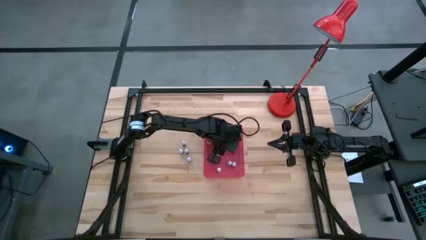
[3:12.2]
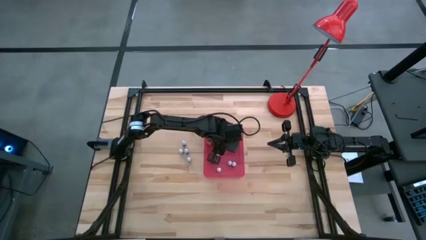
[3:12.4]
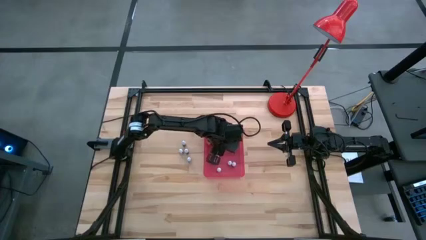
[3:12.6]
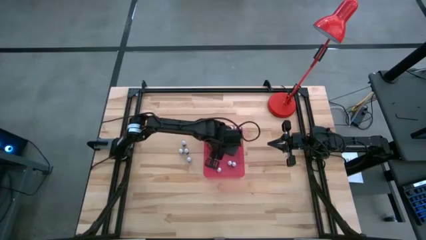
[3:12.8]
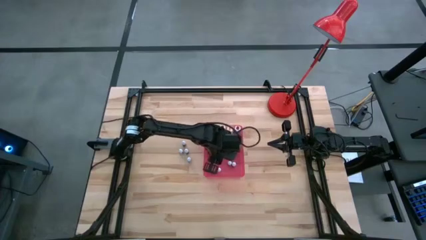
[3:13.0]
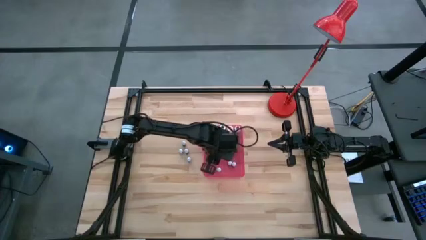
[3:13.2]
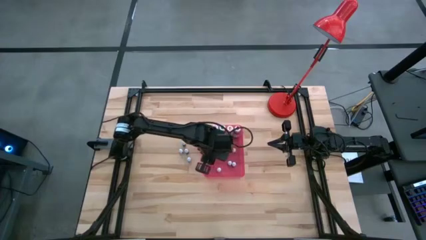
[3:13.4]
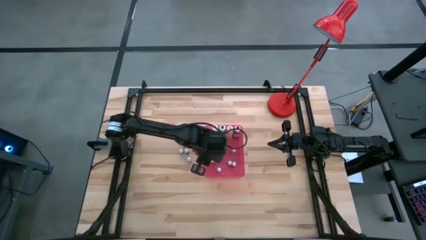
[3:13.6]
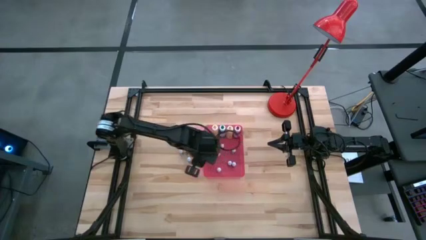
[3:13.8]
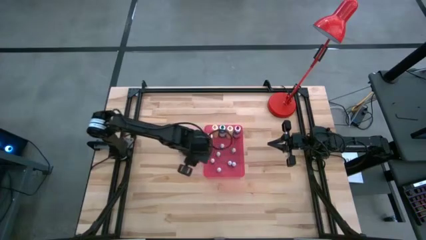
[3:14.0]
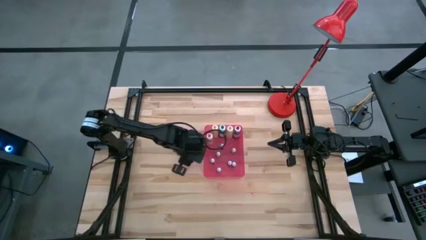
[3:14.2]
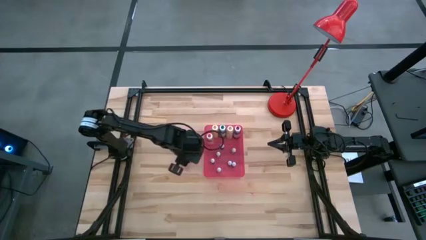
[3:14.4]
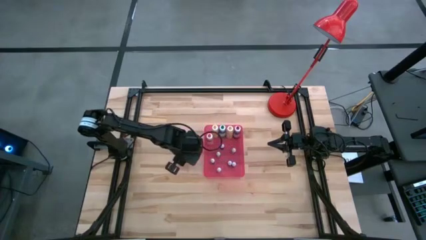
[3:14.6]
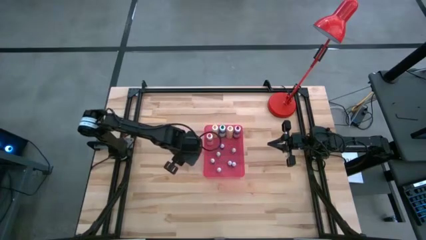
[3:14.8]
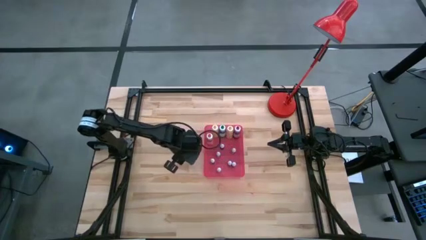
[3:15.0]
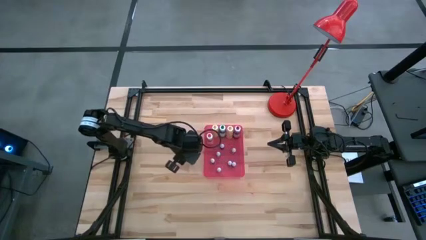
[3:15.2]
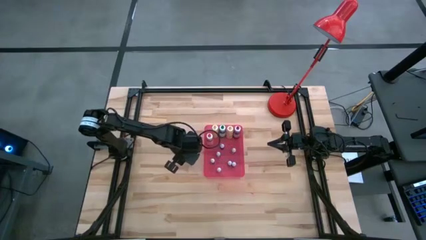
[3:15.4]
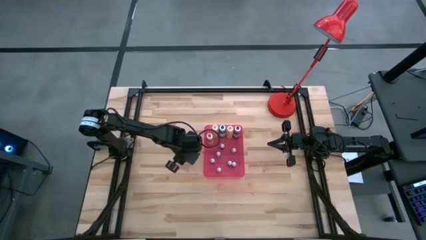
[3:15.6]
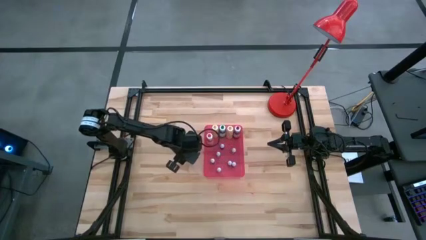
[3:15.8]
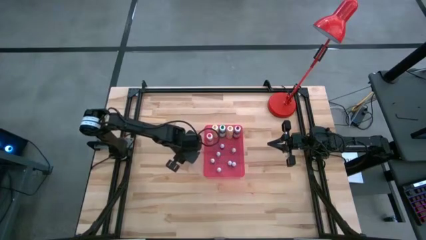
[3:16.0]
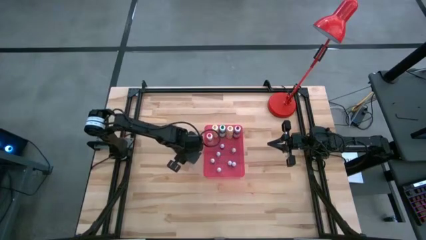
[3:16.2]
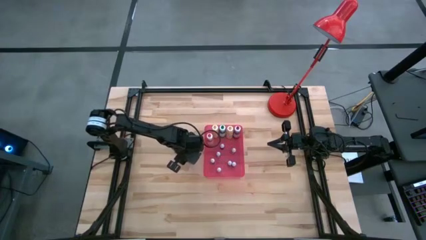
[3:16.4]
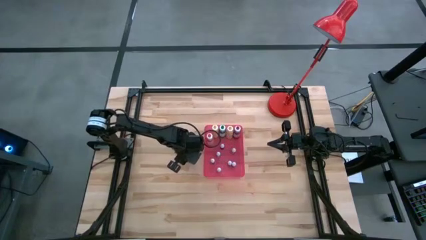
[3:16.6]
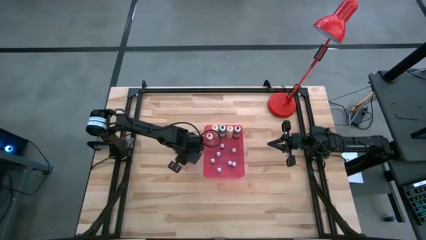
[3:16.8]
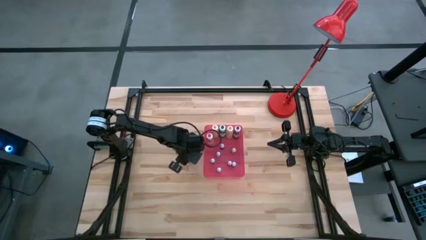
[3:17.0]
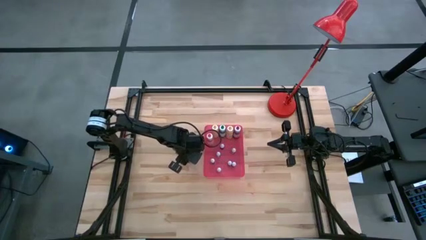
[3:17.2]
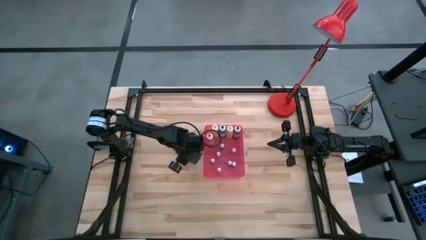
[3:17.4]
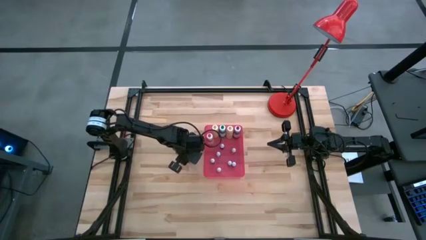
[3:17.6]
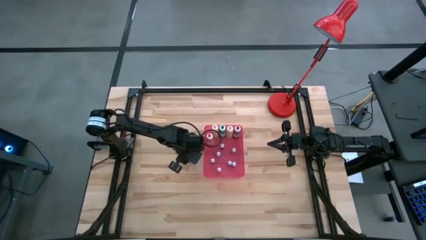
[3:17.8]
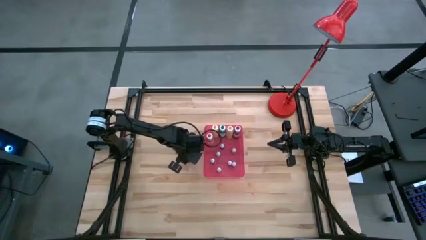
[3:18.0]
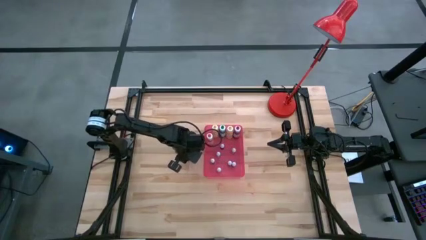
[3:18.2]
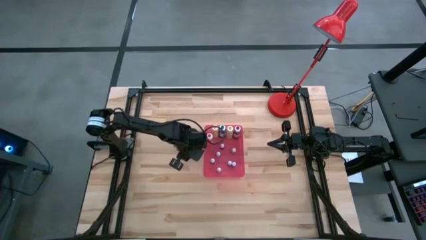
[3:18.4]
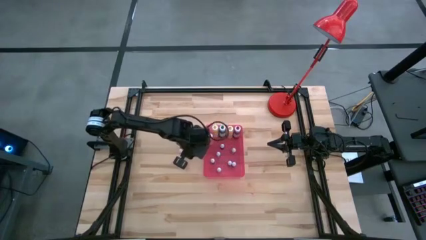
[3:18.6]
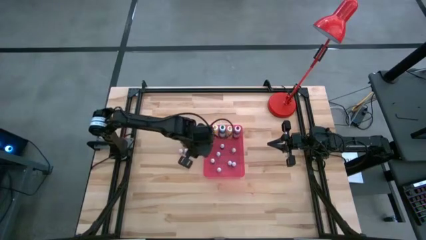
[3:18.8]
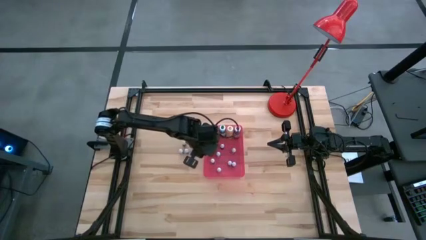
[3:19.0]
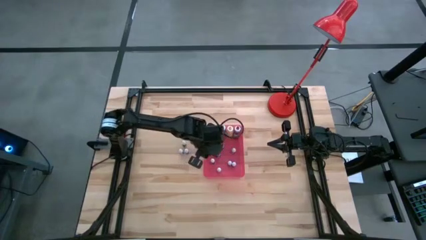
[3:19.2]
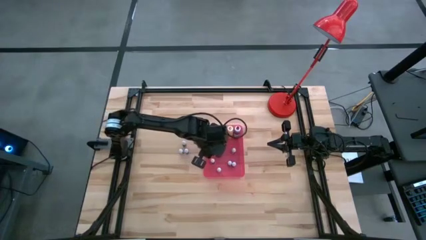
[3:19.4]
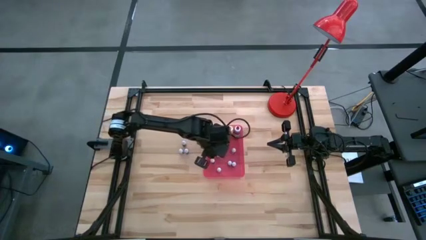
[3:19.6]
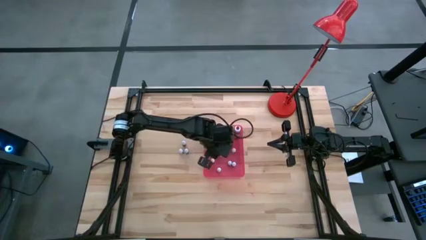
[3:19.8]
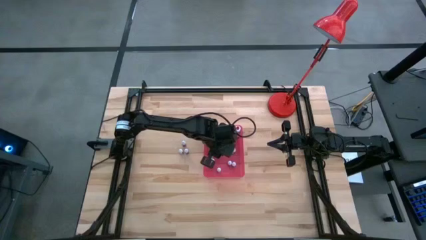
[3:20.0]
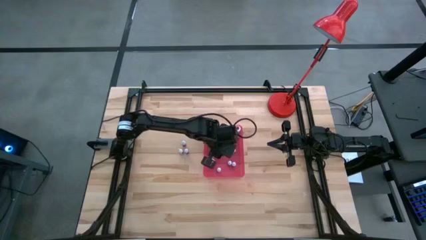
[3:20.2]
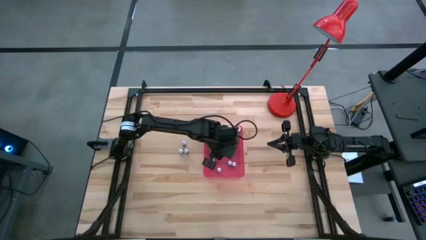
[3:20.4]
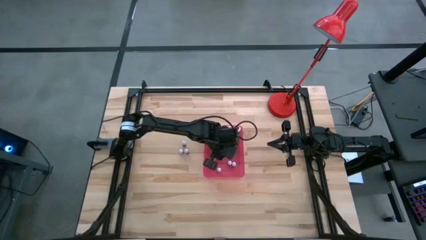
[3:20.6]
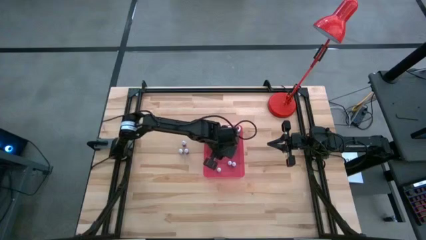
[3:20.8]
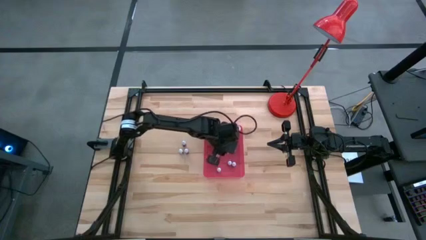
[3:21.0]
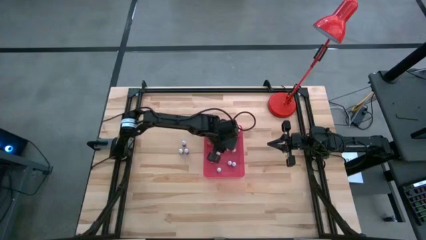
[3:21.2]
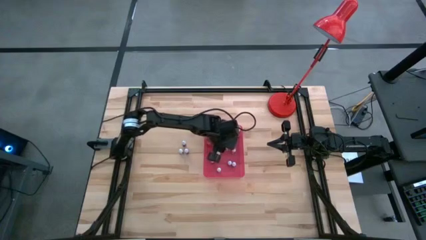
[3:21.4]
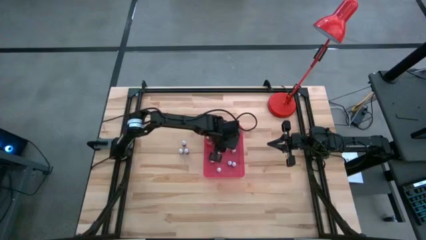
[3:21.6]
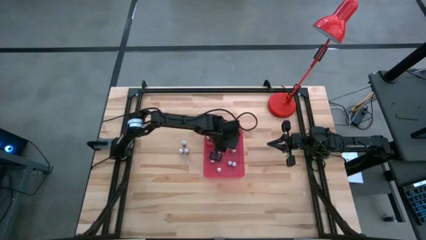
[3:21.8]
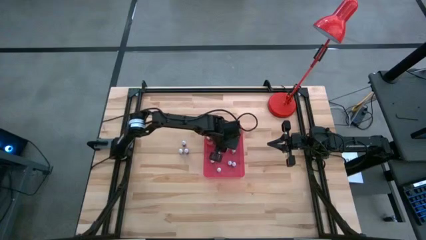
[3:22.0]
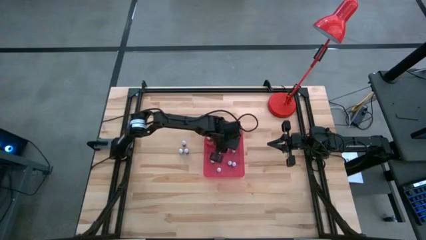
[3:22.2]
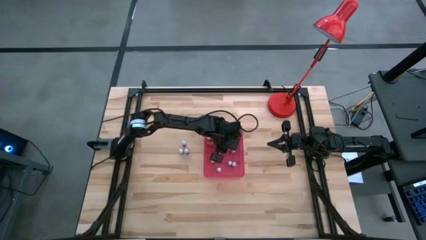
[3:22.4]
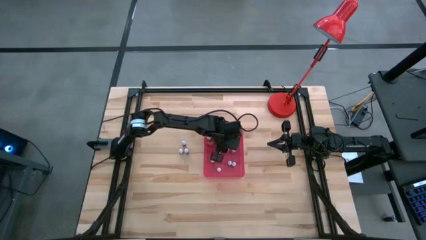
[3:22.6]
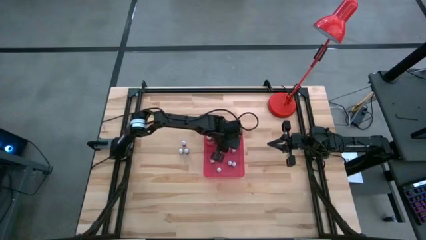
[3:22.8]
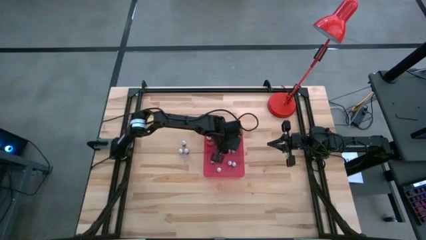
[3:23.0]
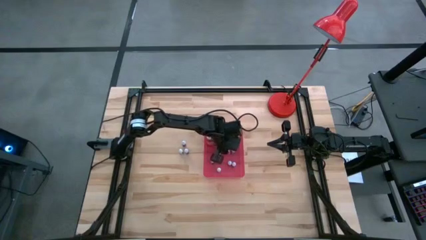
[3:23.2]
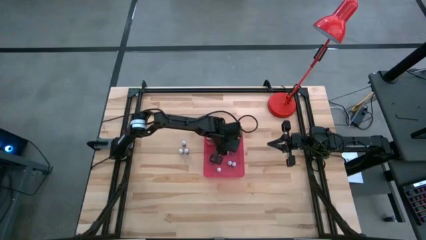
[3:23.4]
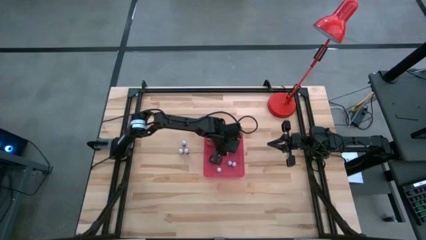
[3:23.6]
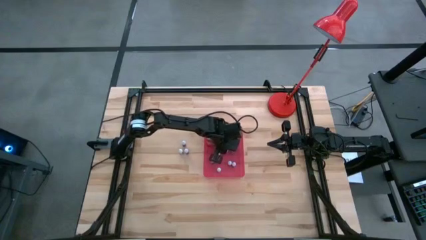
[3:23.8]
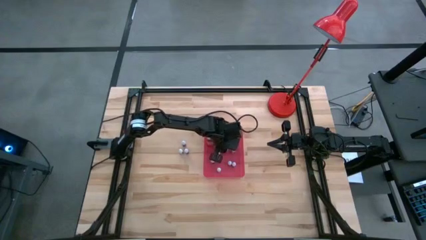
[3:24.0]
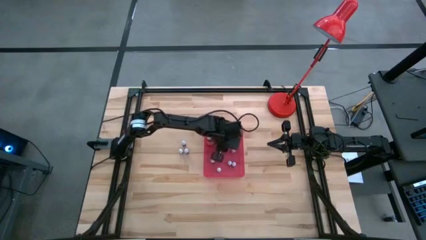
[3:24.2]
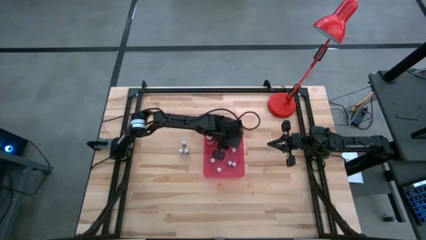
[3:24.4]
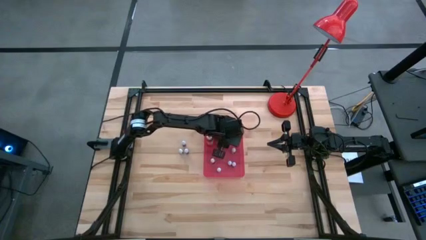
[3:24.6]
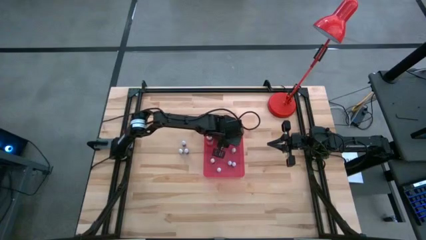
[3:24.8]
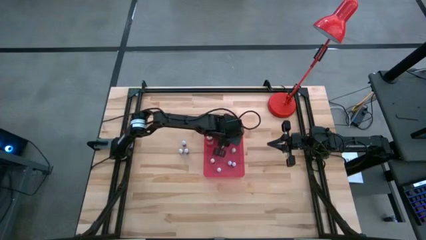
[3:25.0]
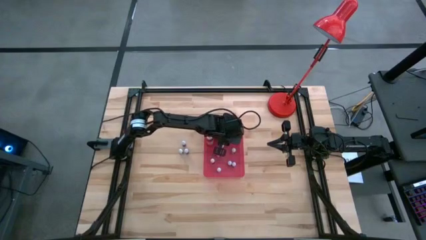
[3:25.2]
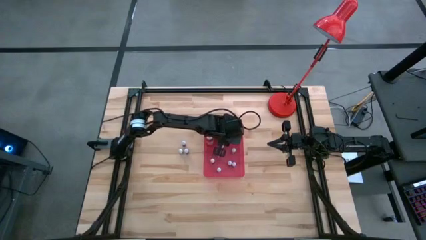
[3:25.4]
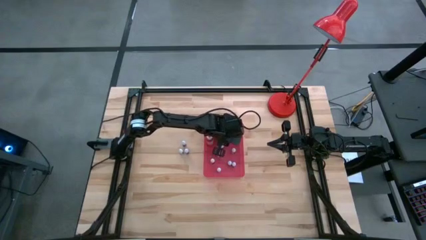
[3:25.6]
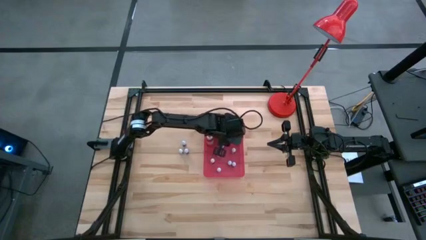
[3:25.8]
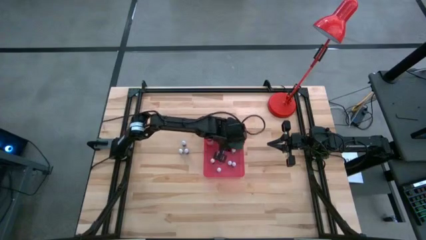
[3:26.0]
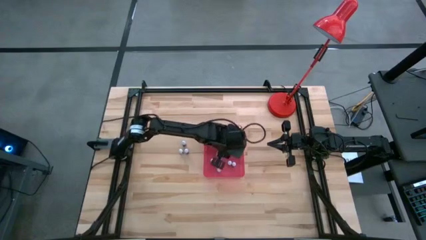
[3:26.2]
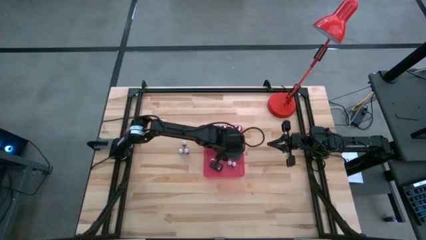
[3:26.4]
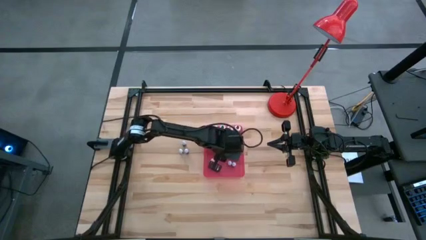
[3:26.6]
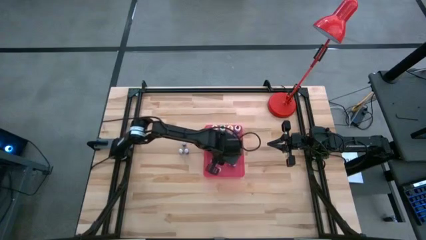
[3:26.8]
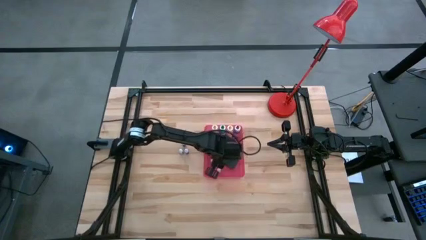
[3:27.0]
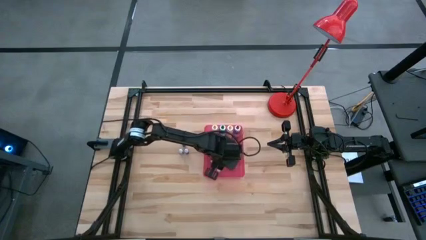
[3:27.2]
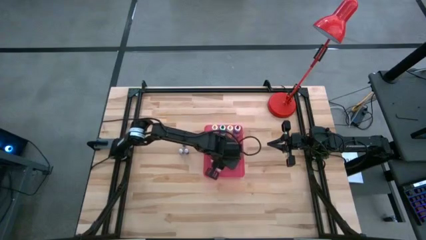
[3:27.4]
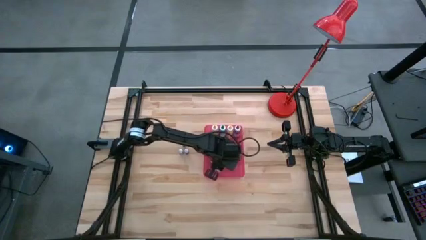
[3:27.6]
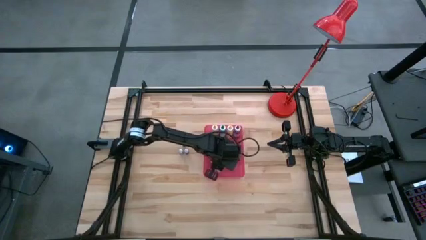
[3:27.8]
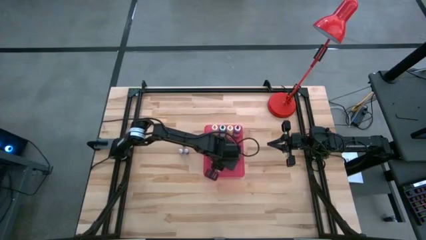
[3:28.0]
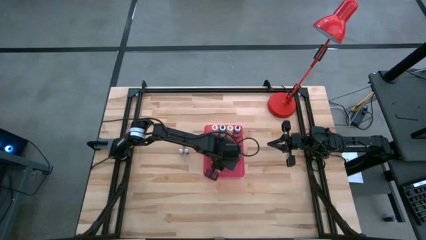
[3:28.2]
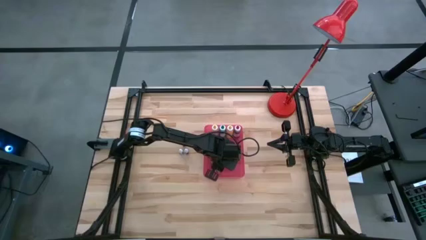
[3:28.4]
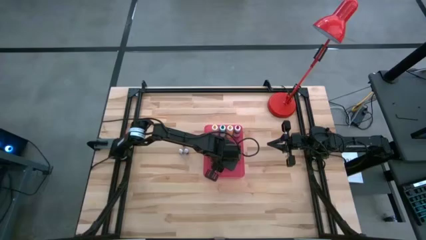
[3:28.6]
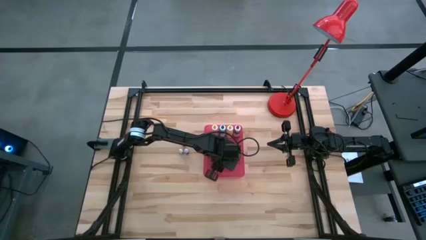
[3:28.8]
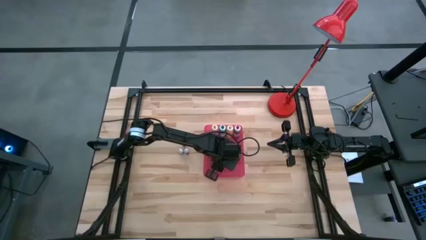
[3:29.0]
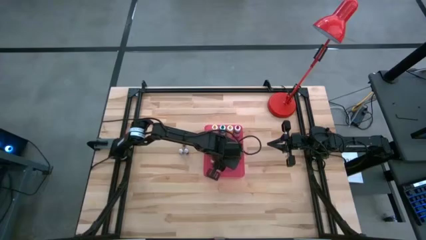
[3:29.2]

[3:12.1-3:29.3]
Task: Pick & Place food coloring
Put the small food coloring bottle into the red bin

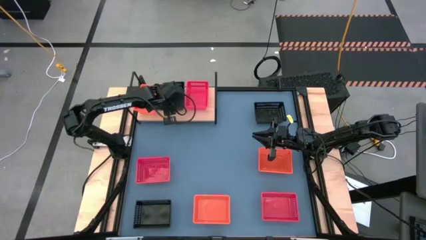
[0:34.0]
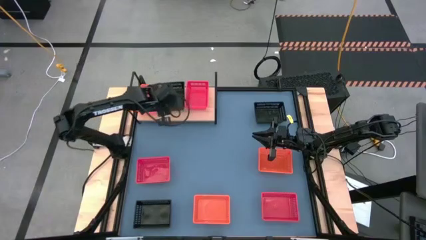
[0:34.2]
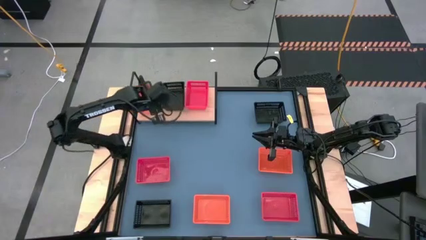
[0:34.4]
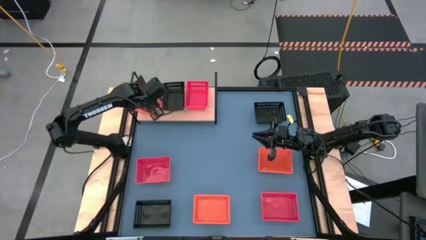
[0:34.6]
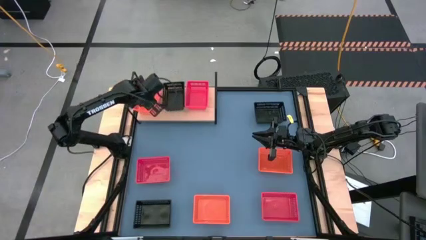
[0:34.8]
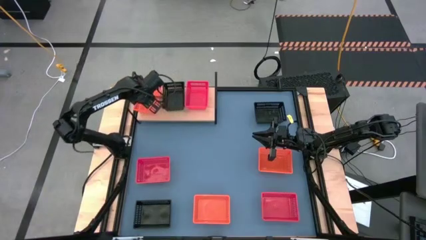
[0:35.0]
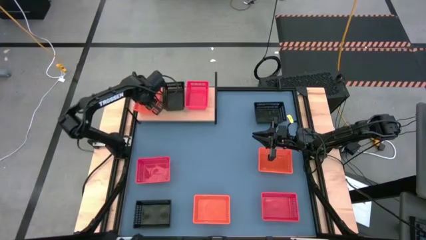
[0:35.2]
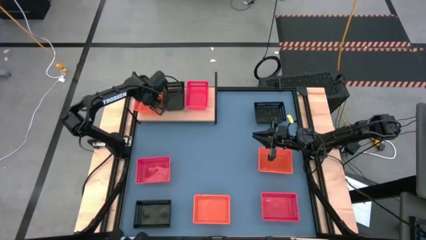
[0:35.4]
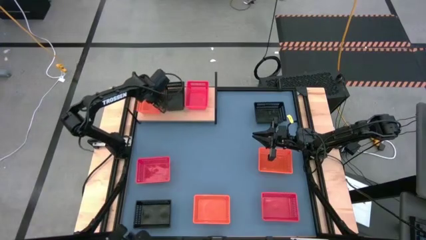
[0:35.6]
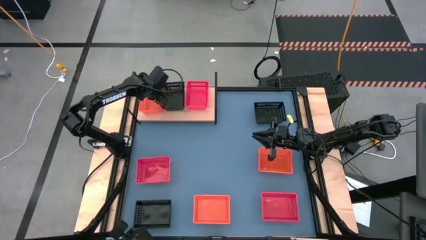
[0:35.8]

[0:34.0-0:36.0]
Task: Stack baskets on shelf by color
Adjust the orange bin on the shelf
